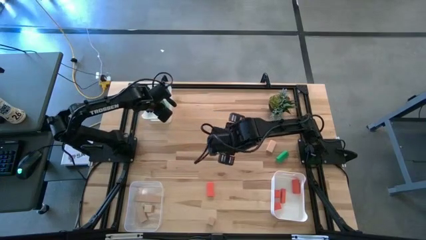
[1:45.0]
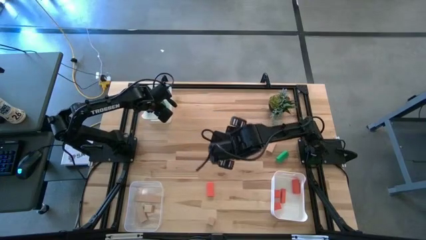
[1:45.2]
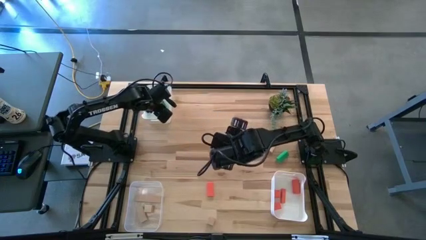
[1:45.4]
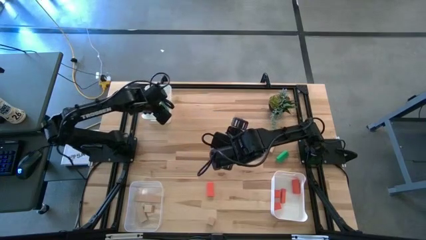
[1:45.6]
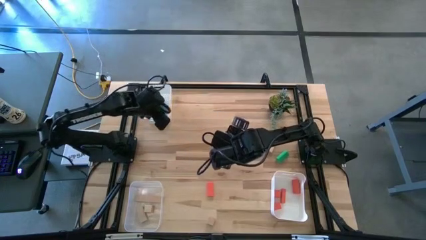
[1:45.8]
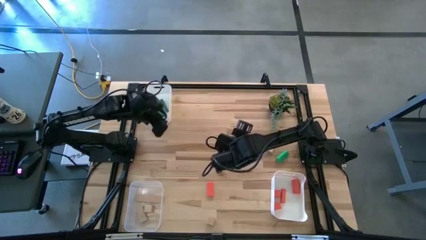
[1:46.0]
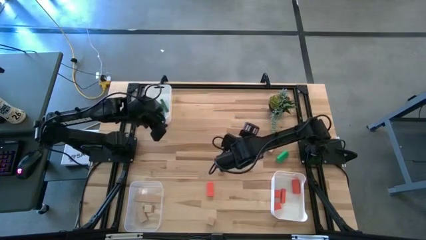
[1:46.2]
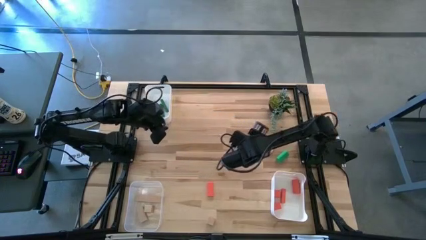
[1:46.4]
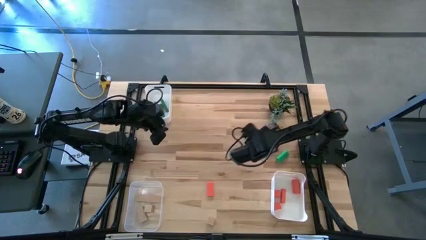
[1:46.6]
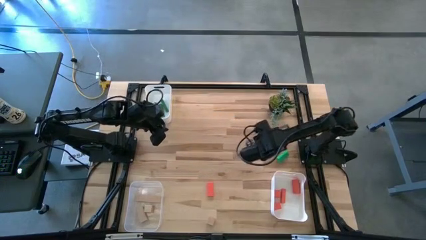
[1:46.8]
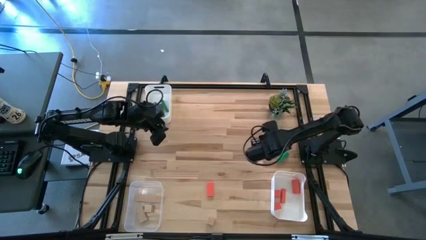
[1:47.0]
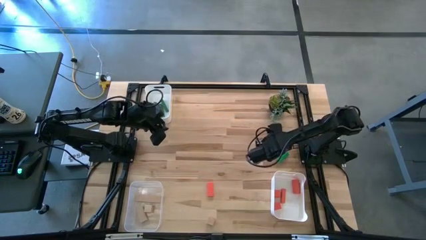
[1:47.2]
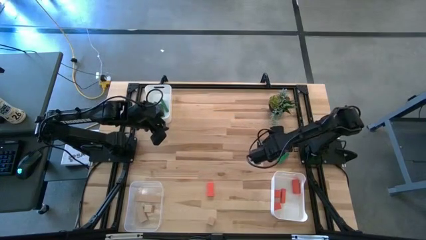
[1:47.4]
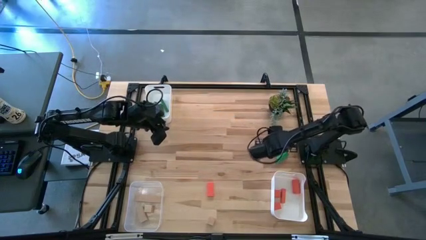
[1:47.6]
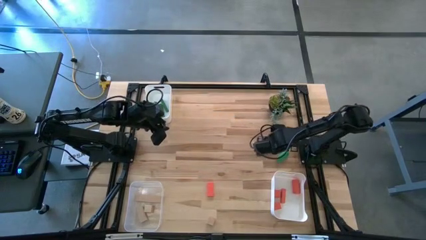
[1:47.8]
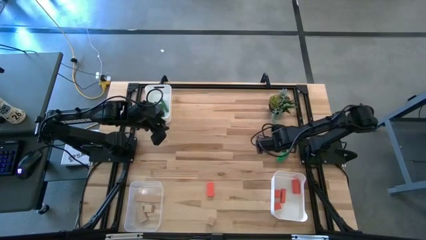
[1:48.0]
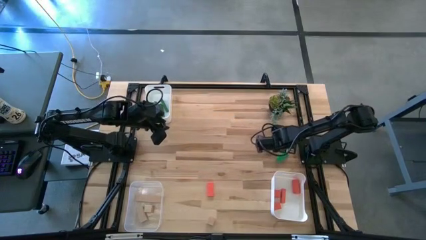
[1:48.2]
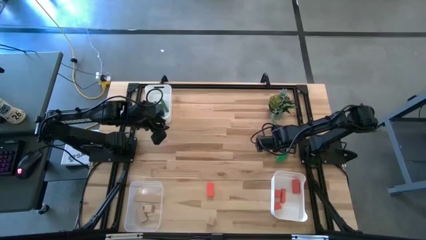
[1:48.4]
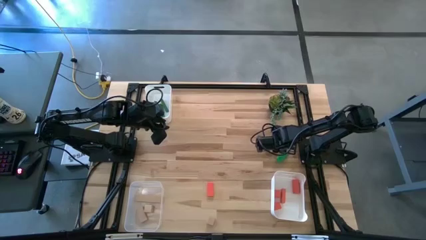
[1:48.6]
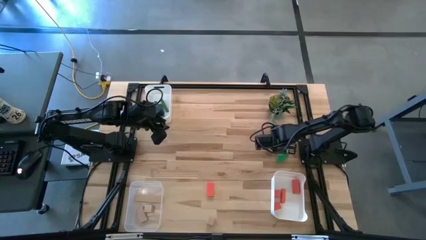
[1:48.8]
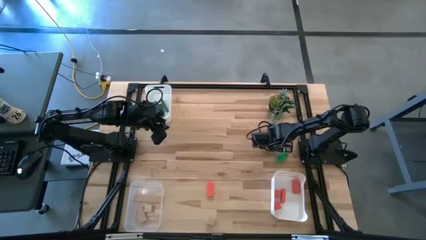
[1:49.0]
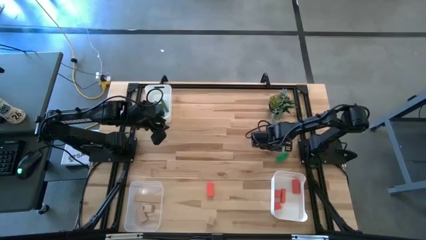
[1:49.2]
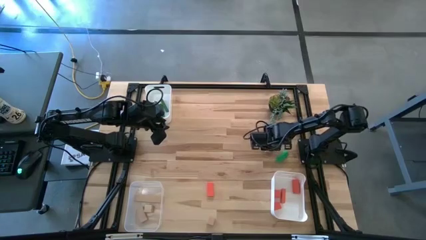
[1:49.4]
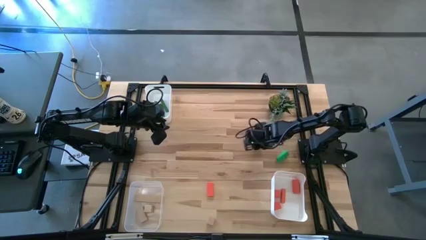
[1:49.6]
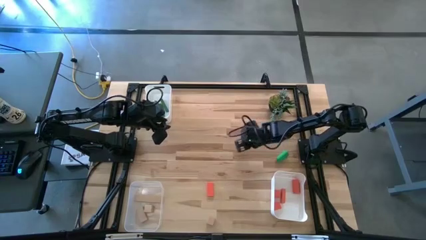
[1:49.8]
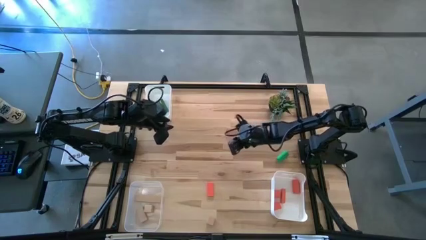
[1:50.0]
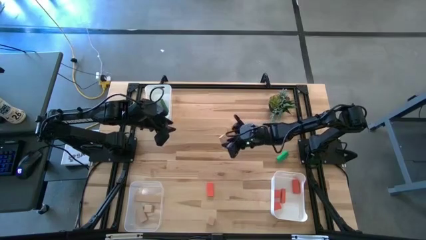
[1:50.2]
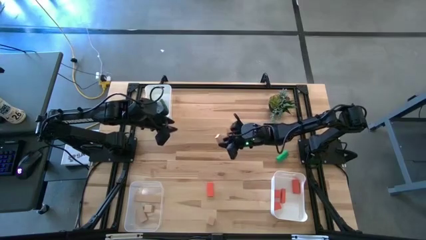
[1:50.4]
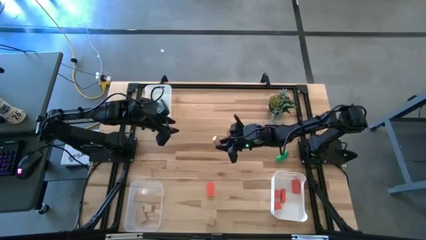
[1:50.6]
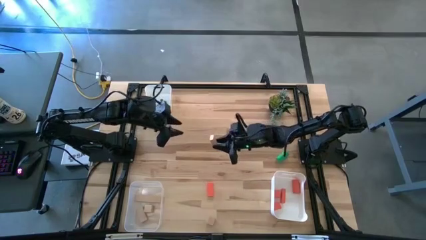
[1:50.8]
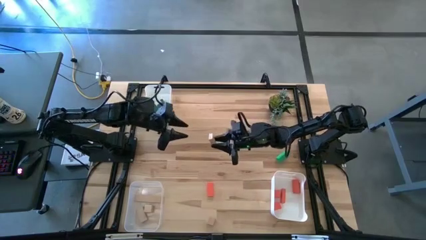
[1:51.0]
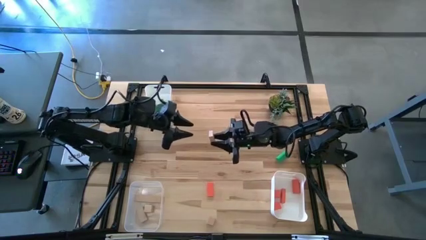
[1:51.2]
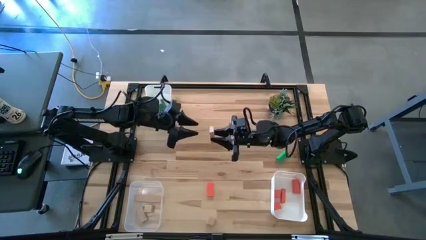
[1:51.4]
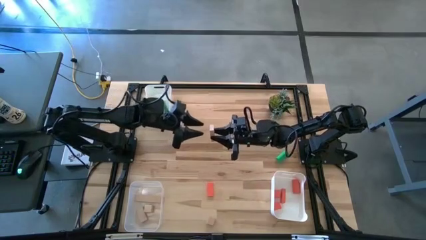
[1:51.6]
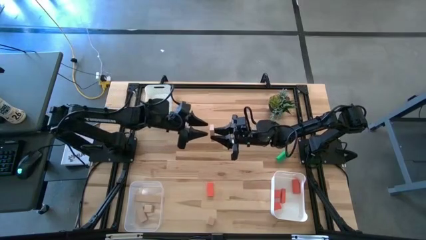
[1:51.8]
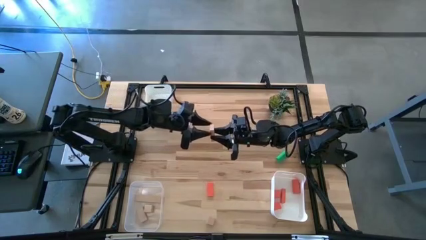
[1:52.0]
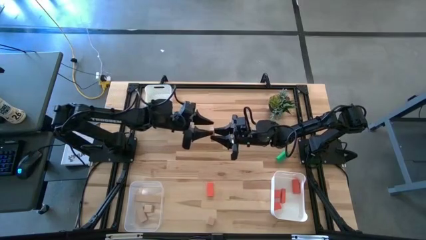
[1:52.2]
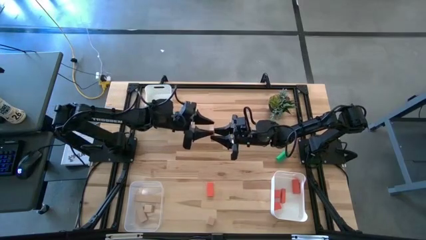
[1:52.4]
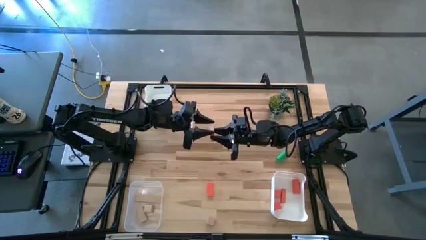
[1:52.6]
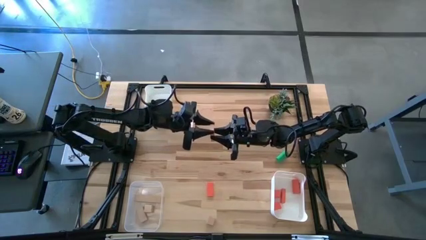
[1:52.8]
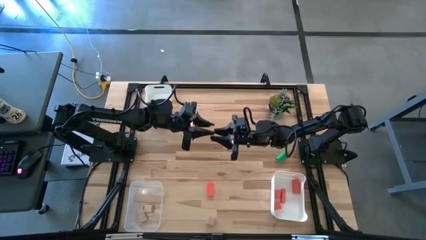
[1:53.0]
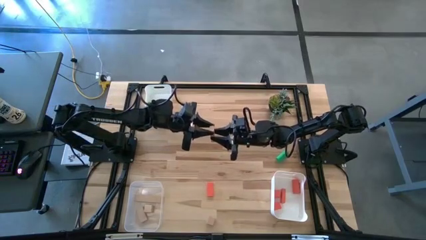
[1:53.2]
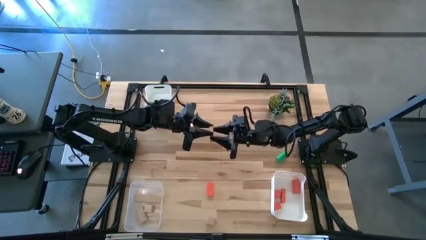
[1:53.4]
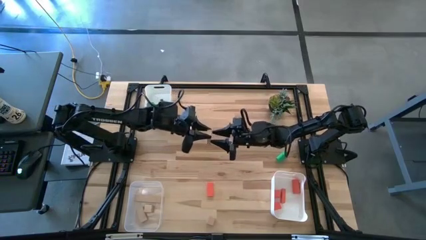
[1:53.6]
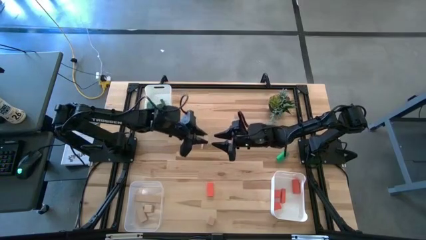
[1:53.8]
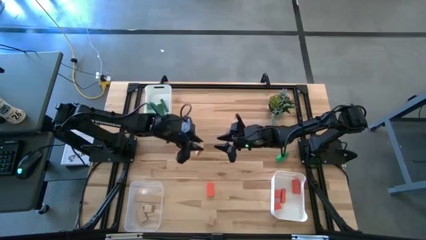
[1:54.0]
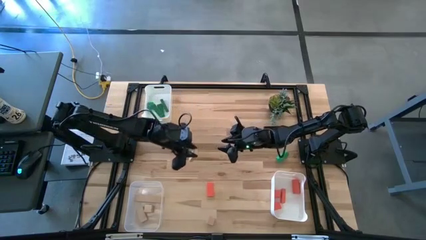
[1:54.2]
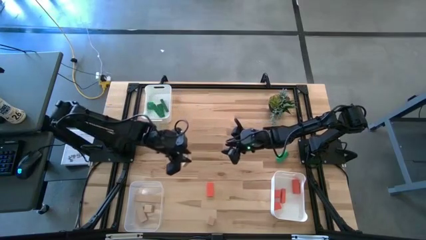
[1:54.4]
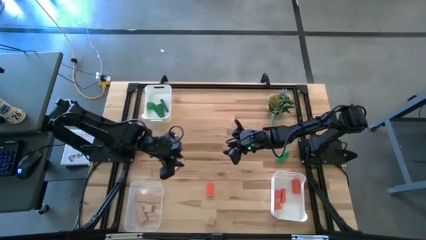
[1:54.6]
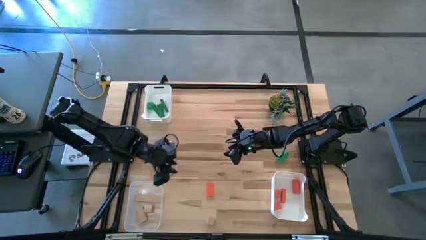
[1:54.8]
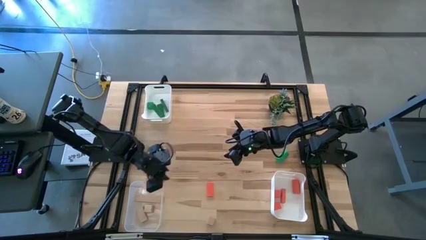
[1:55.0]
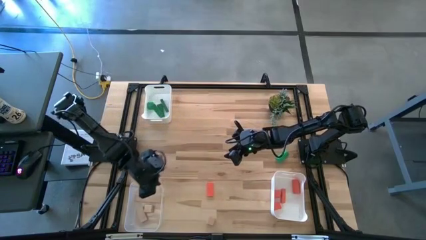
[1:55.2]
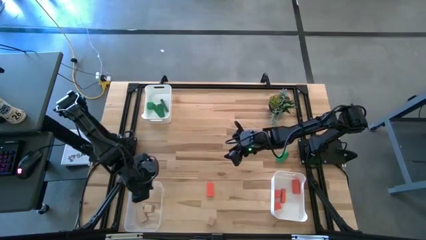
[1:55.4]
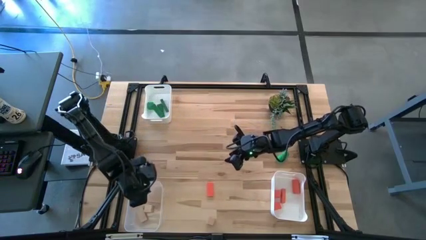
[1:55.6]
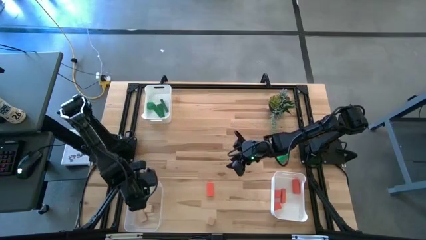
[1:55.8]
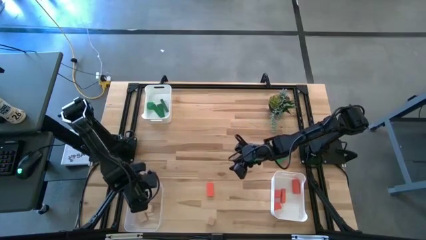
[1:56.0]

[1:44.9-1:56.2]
Task: Sort & place blocks by color
Put the brown block into the transparent bin

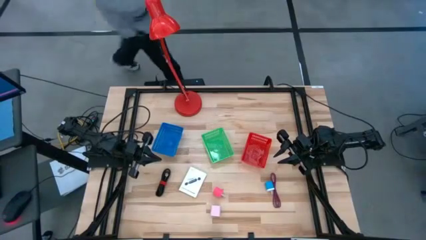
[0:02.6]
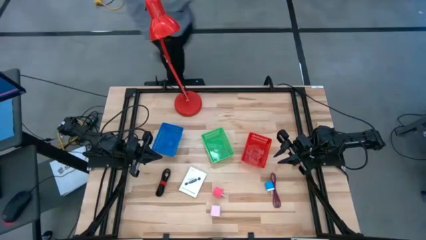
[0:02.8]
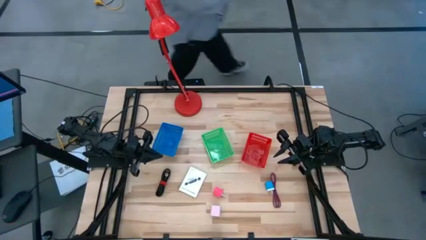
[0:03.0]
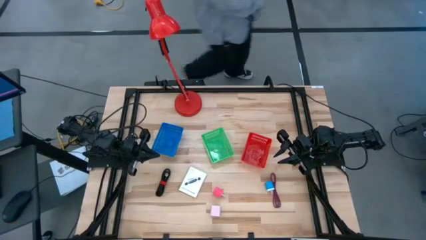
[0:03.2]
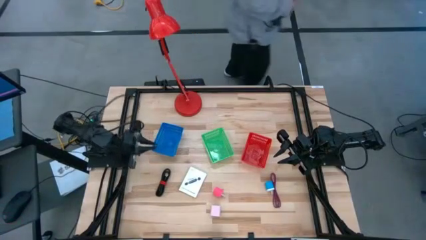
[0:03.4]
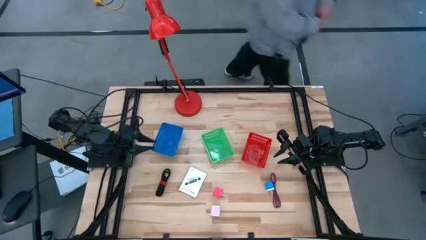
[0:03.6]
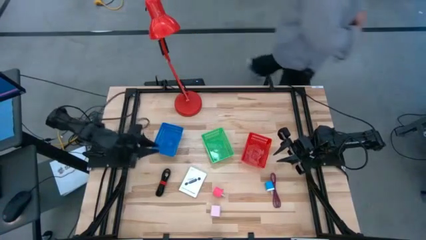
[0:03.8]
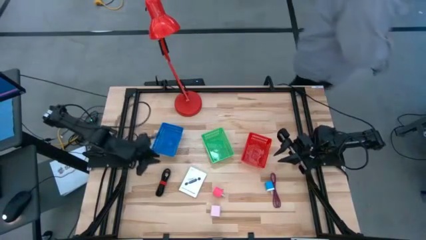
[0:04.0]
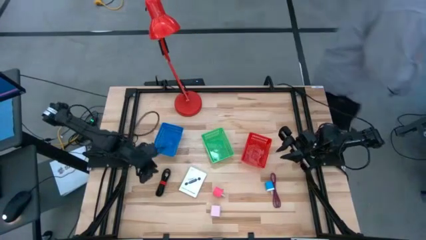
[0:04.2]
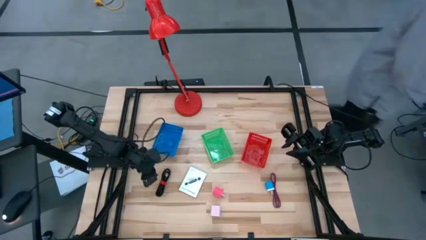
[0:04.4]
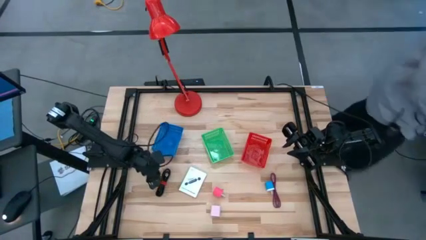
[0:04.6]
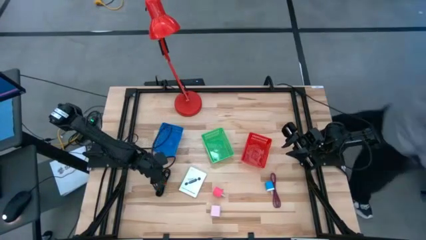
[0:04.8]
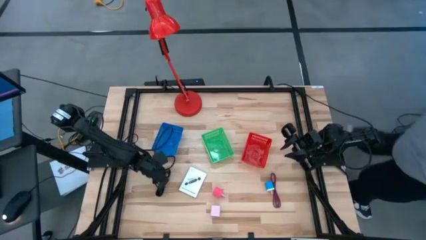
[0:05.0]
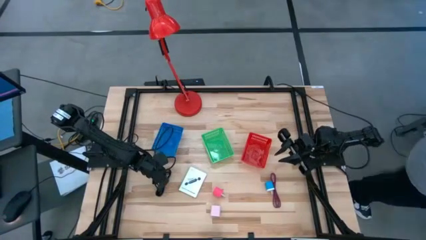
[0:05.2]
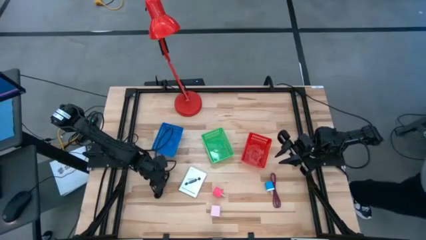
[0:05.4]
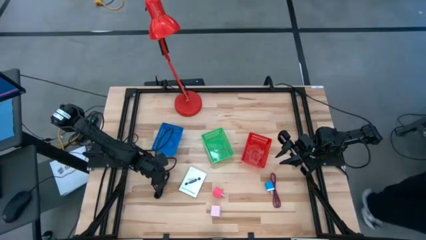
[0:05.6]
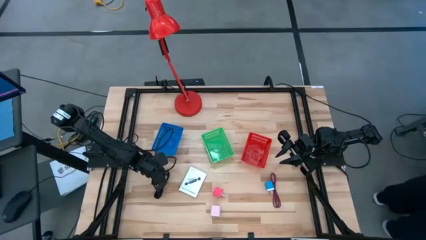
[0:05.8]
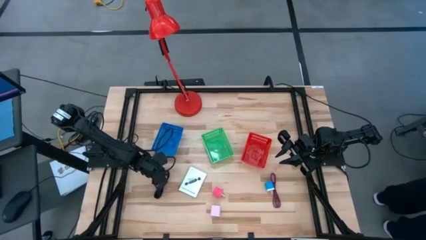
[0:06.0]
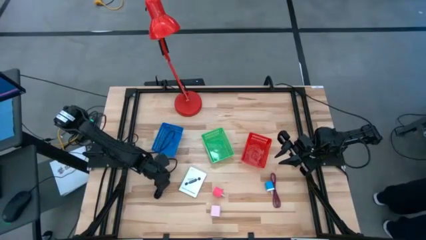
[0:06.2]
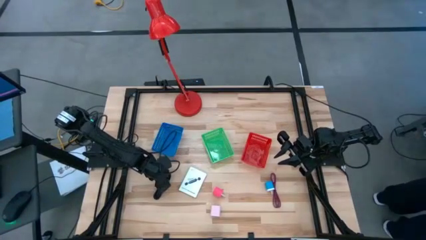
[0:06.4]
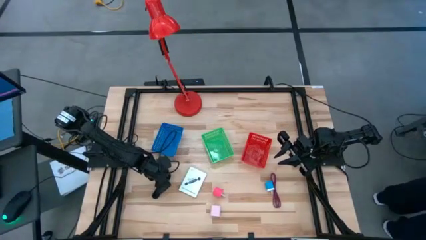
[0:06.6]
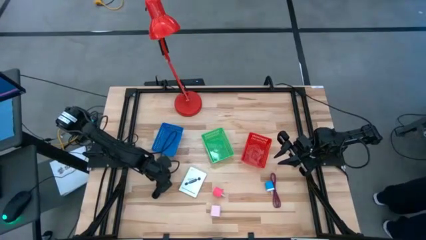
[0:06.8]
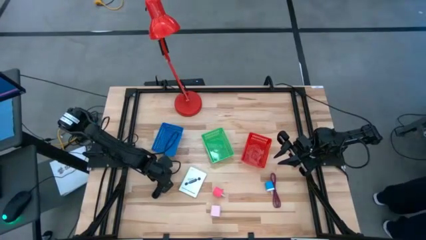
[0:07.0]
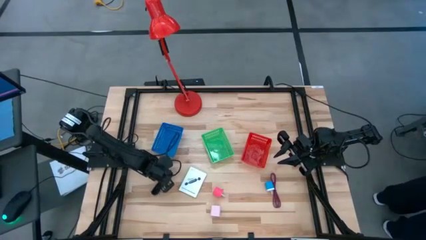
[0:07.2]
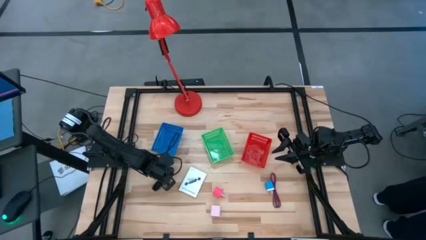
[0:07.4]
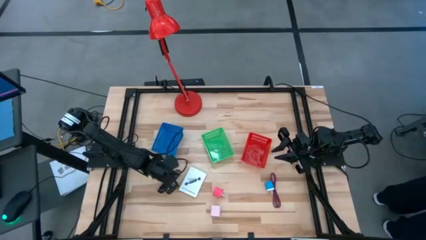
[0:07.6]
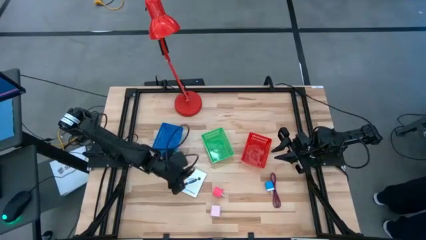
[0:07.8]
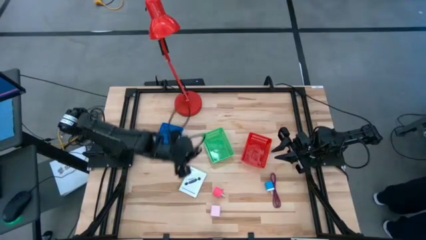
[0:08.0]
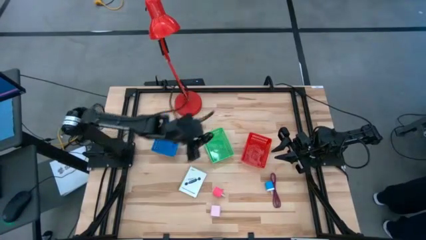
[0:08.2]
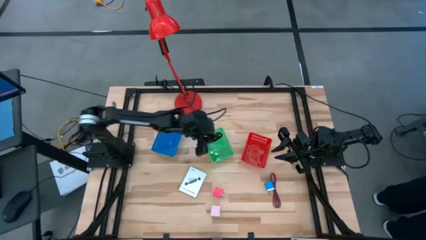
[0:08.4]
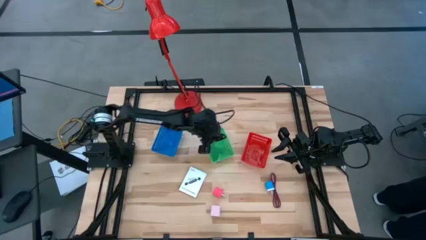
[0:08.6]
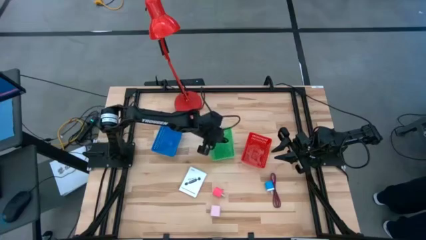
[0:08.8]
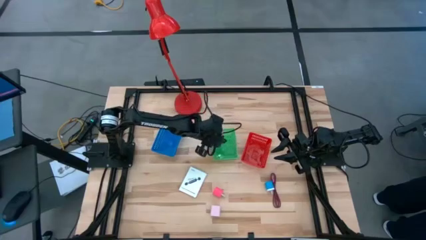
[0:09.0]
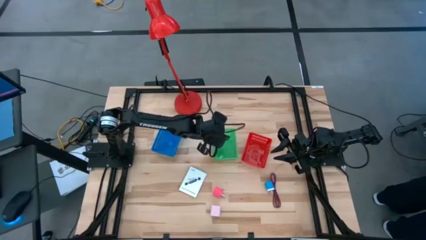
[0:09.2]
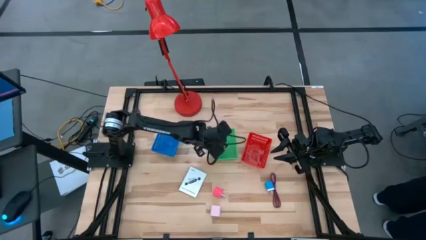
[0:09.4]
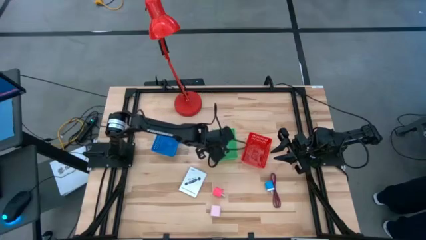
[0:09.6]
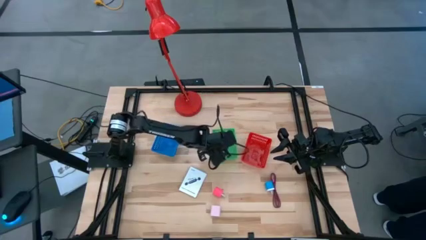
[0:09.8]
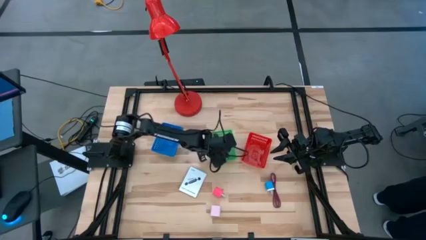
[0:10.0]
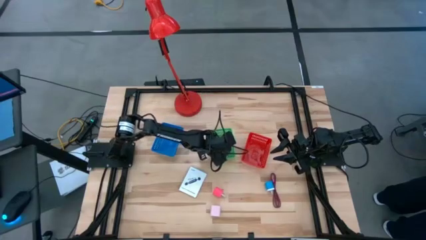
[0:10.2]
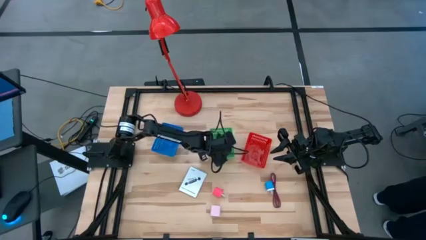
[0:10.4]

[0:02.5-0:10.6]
Task: Pick and place items into bin
Put the black charger cable into the green bin
